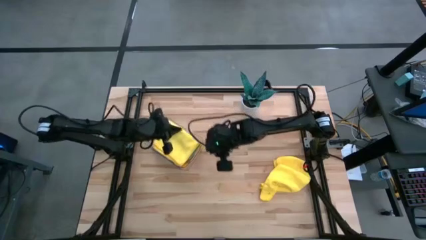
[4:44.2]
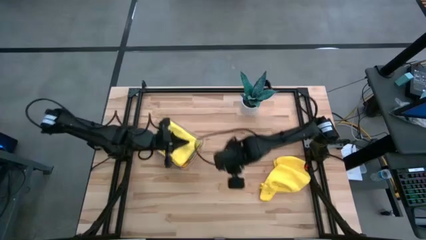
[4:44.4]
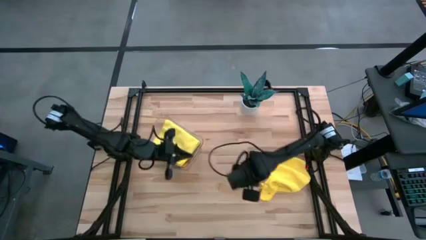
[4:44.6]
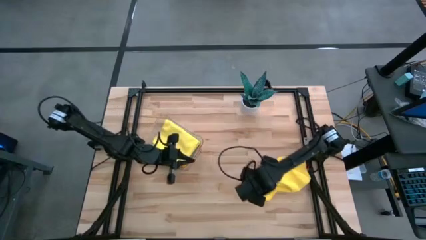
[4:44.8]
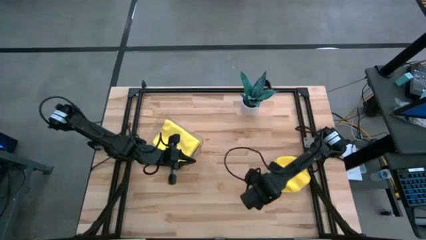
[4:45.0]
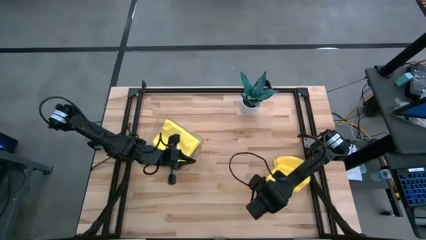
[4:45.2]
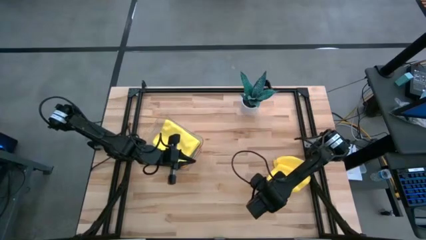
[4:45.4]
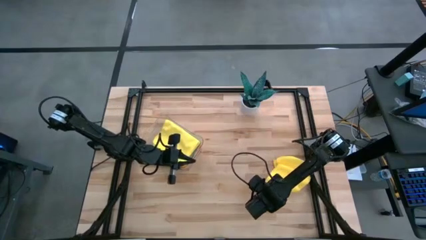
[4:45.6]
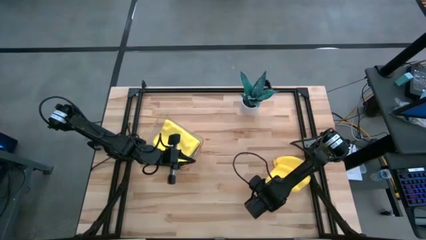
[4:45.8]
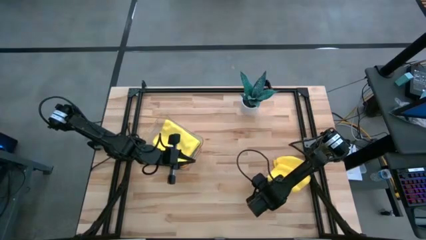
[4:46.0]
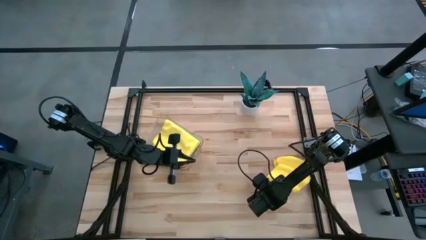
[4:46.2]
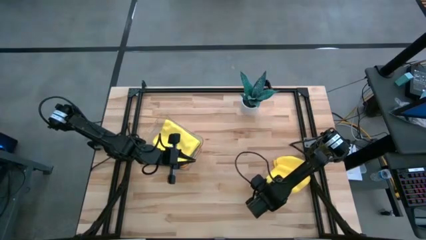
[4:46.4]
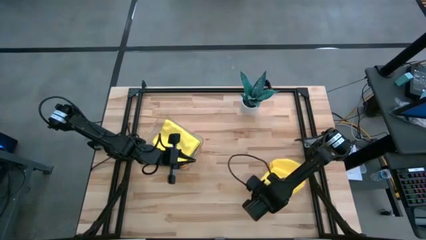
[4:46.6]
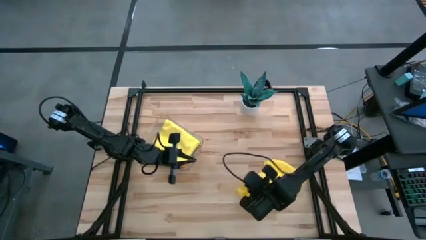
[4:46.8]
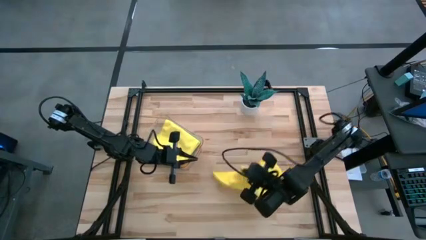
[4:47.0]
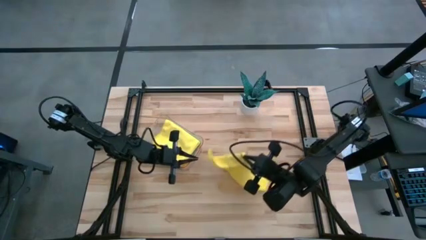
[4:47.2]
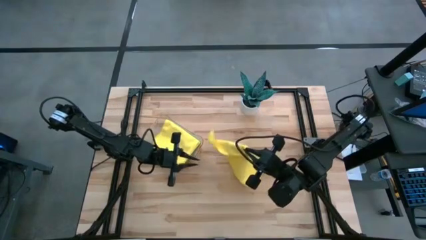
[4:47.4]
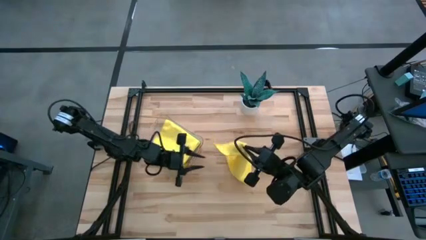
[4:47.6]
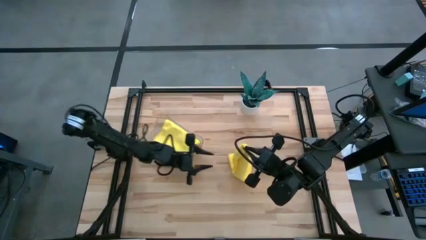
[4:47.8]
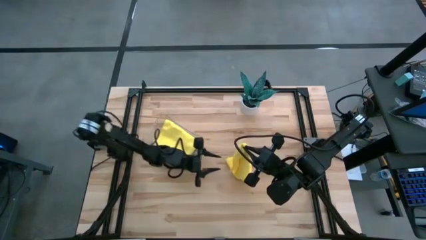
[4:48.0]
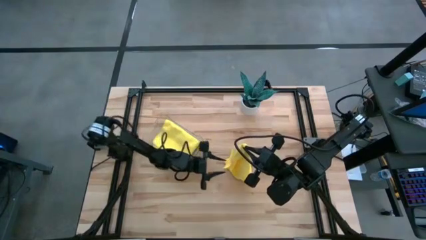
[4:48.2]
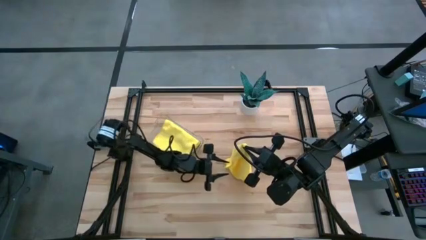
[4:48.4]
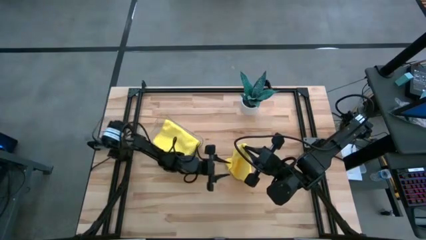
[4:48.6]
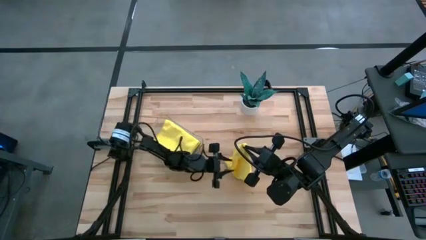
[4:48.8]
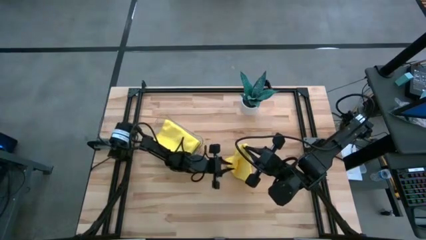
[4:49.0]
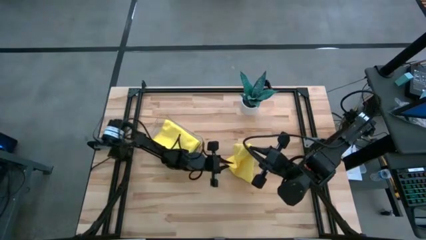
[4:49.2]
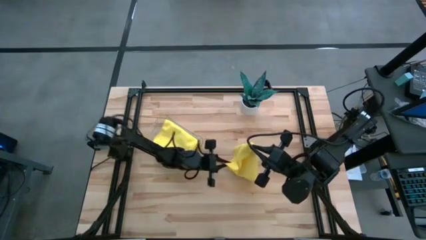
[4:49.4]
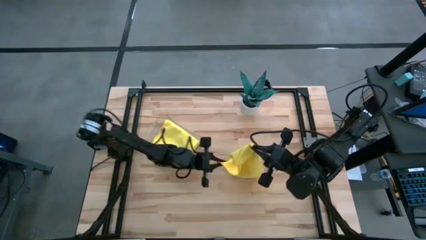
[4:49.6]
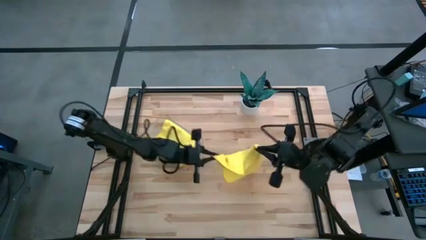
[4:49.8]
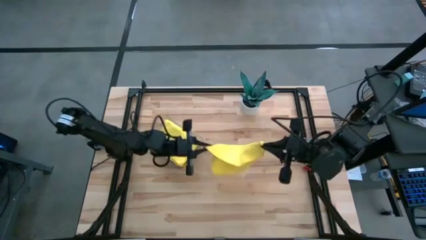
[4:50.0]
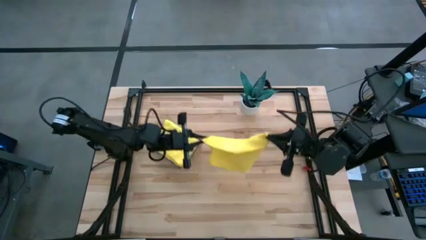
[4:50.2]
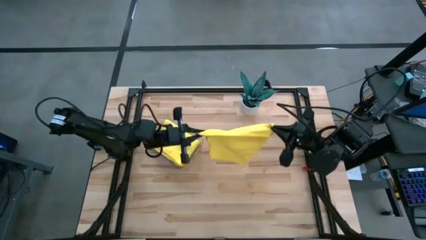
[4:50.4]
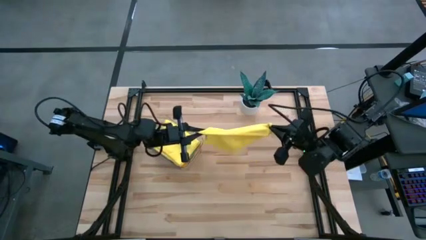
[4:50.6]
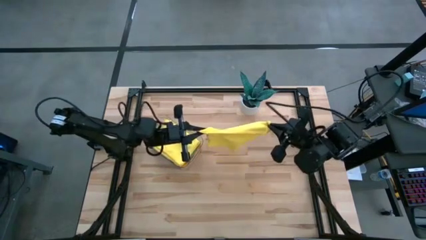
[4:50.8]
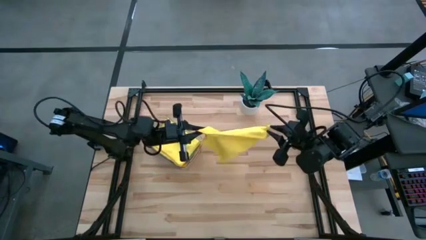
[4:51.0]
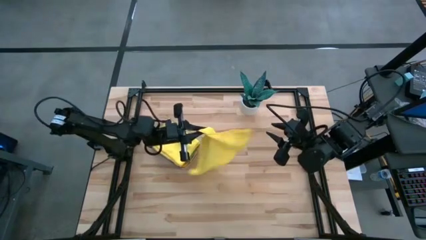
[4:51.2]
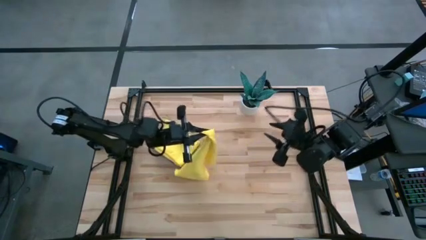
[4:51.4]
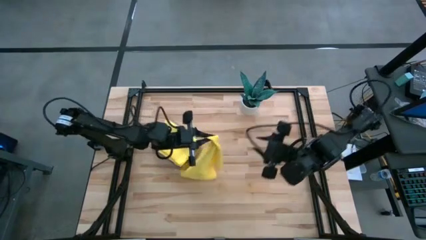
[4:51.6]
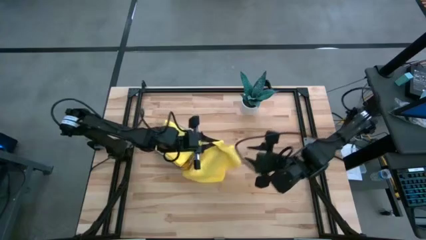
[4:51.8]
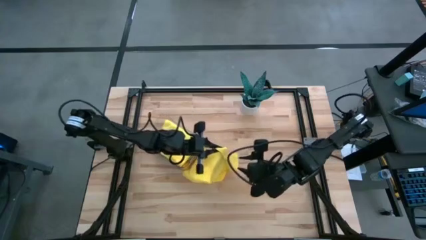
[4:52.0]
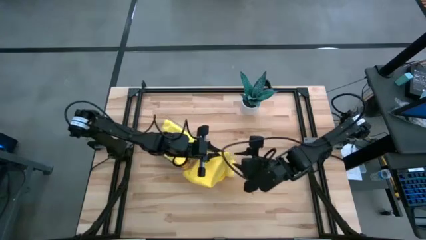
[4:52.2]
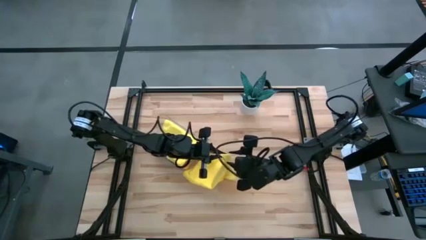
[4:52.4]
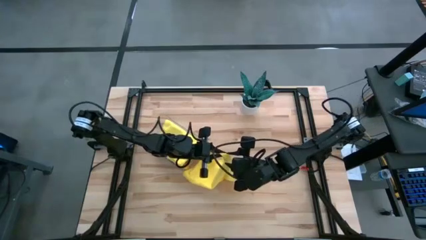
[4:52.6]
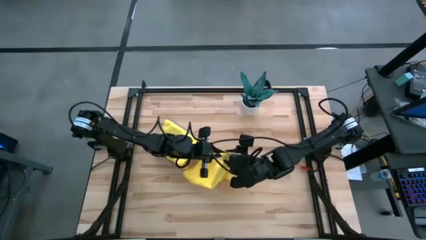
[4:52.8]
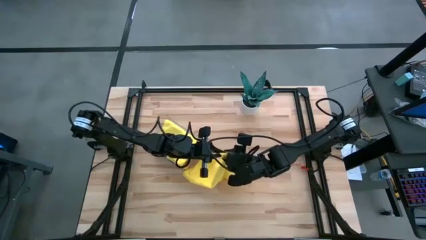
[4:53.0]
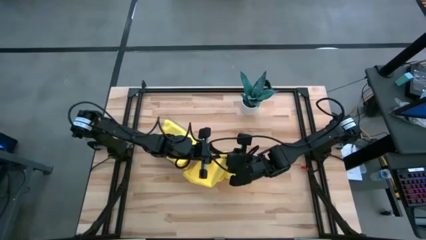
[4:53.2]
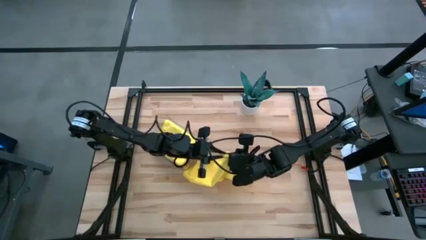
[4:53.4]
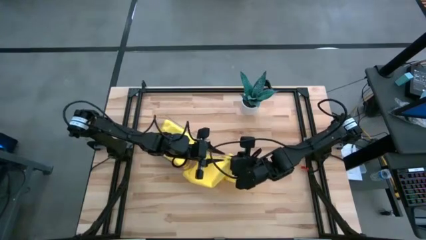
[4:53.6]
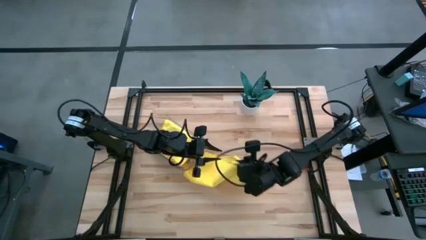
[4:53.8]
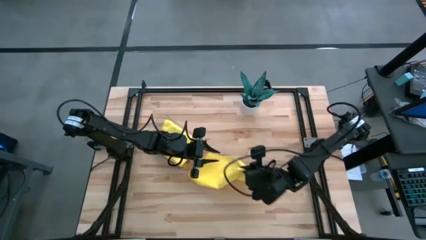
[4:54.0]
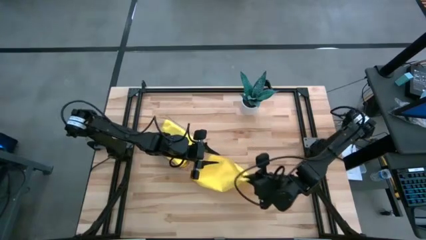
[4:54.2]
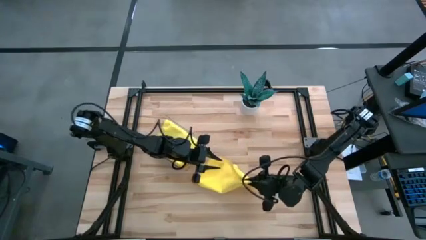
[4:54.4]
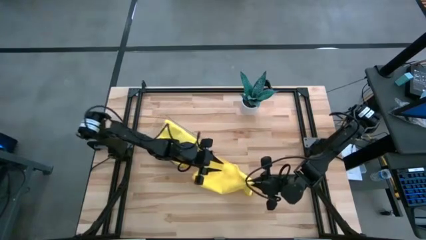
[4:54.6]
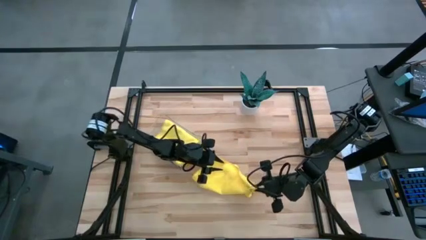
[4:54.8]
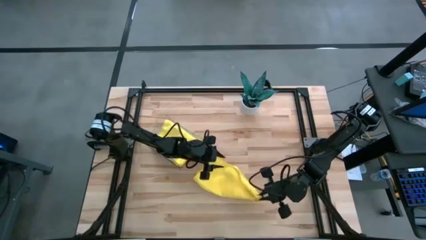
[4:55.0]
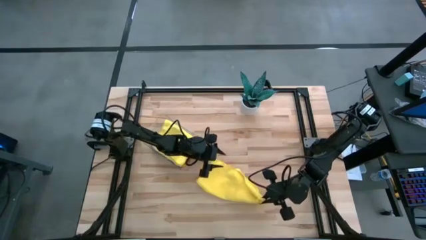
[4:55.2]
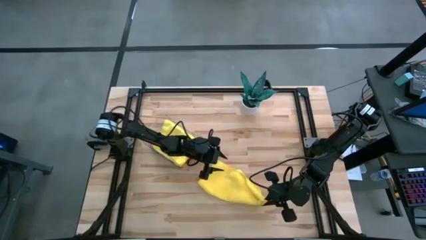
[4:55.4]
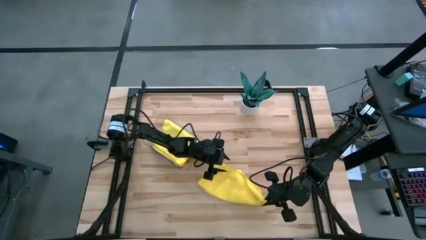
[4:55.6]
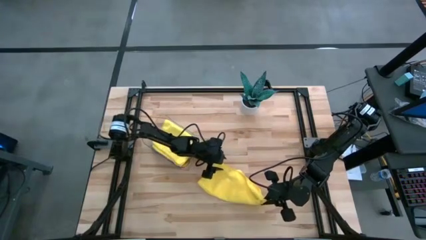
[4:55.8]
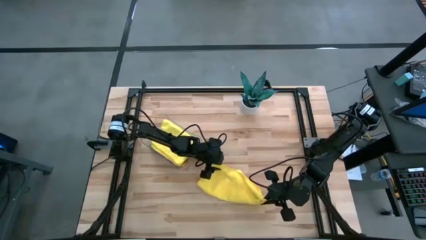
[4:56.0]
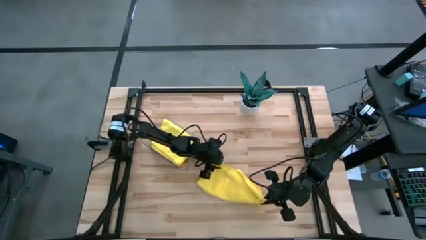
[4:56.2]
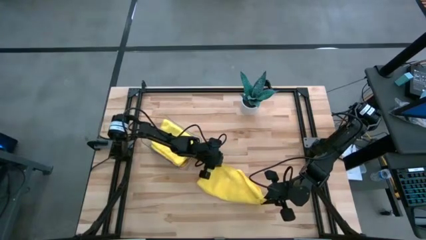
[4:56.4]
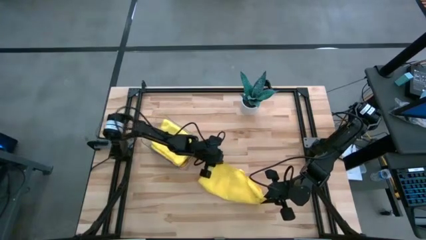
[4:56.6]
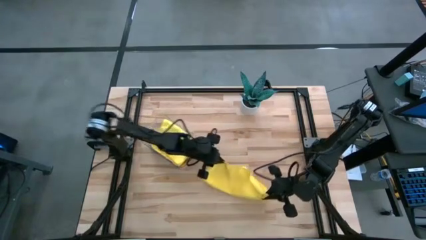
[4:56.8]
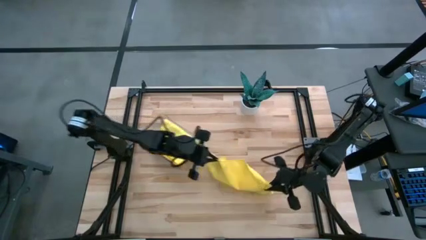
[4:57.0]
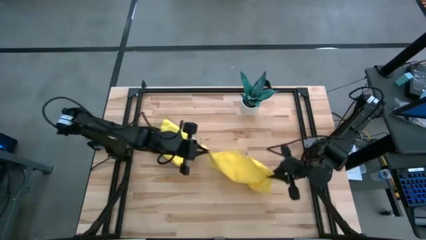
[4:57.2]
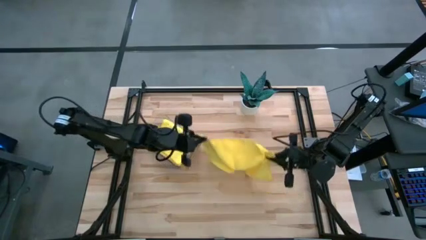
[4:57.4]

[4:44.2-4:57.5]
Task: Fold microfiber towels
Fold the yellow microfiber cloth
